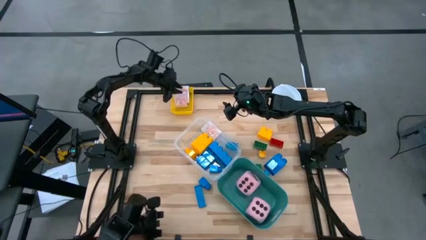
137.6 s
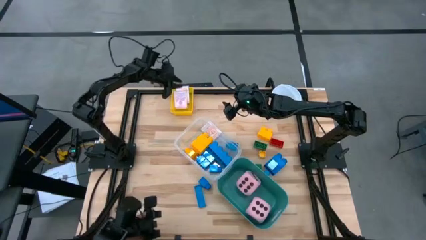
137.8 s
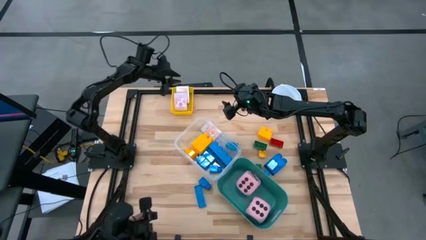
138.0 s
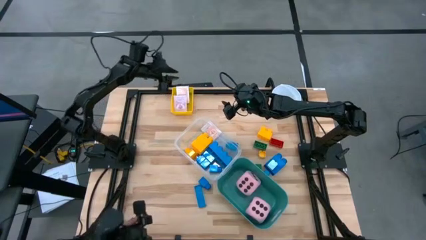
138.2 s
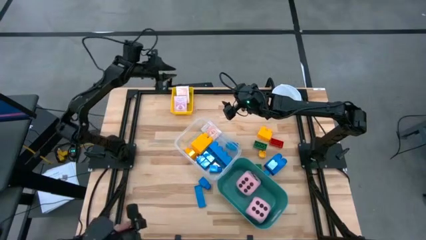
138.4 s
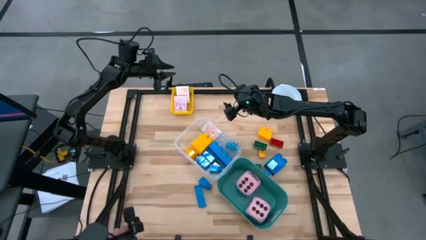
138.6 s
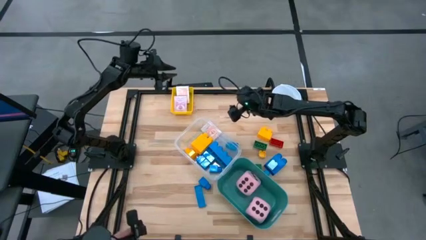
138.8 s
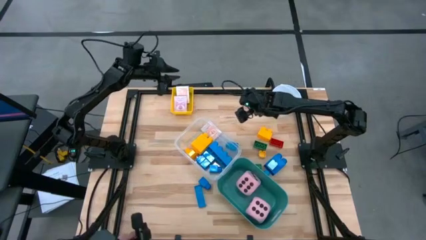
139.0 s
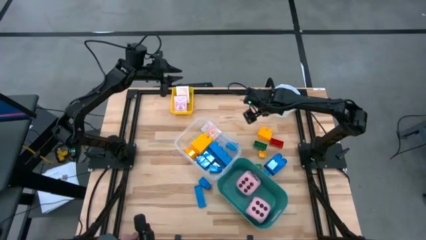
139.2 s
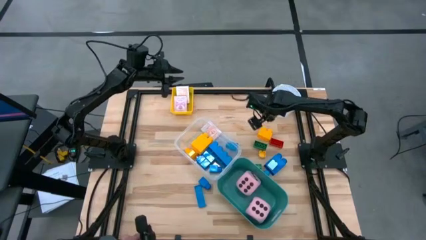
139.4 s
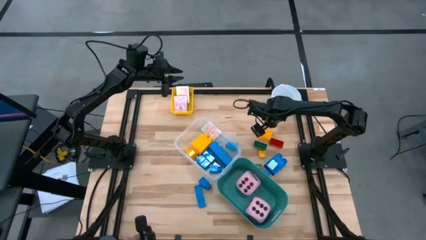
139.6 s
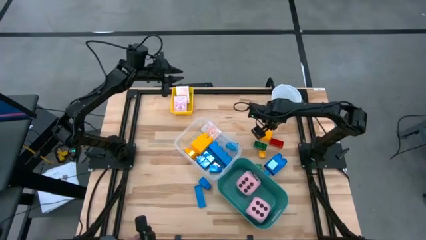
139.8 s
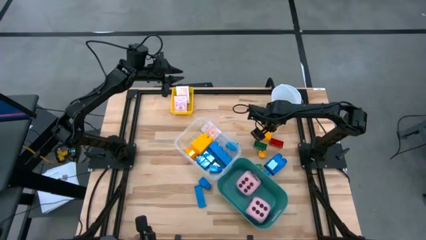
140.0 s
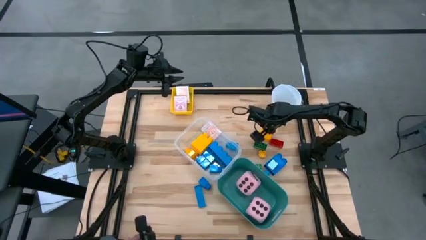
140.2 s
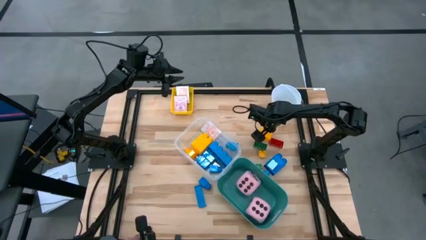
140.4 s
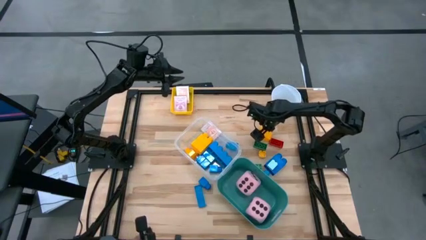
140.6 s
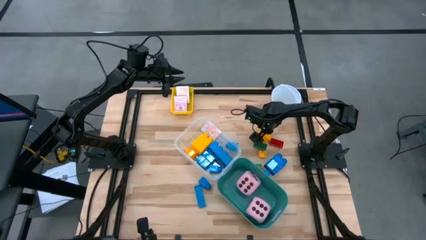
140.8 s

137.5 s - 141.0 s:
Task: Pick & Place Toys
Put the yellow game piece into the transparent bin

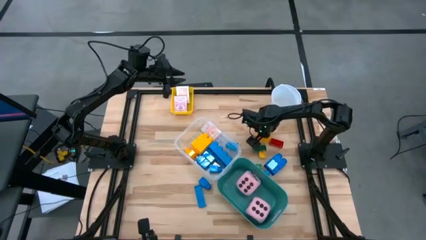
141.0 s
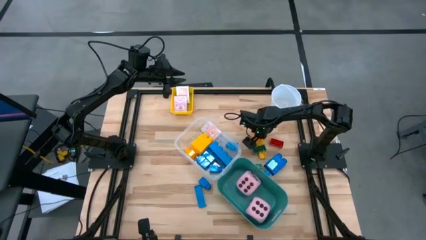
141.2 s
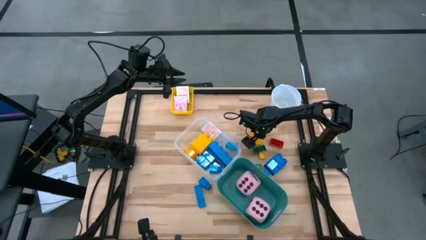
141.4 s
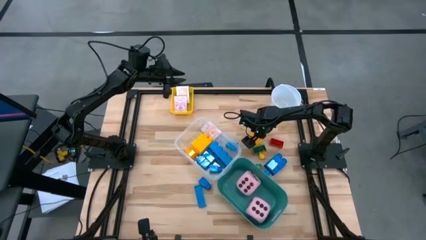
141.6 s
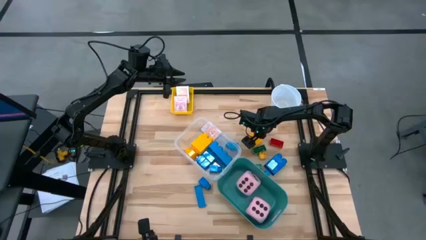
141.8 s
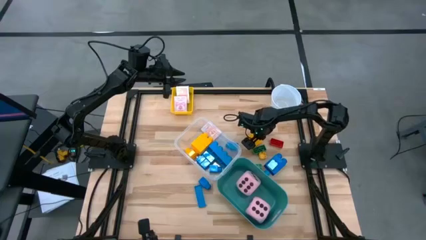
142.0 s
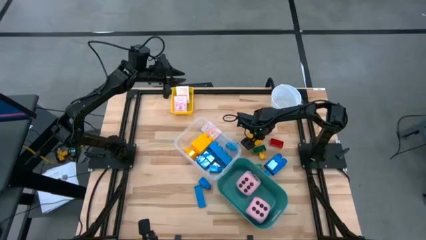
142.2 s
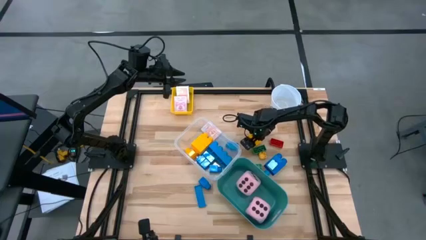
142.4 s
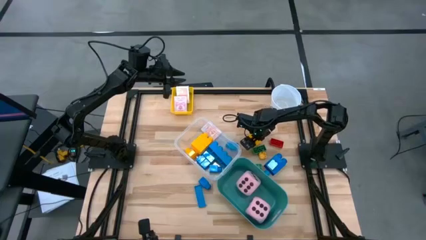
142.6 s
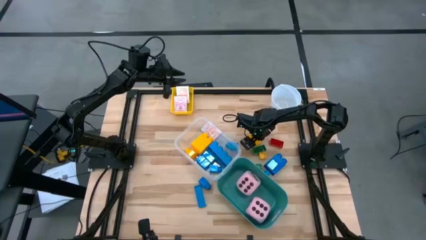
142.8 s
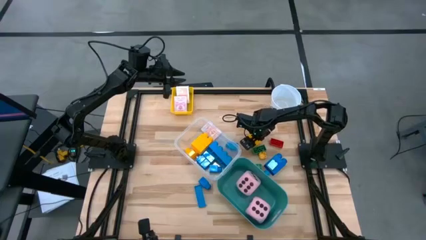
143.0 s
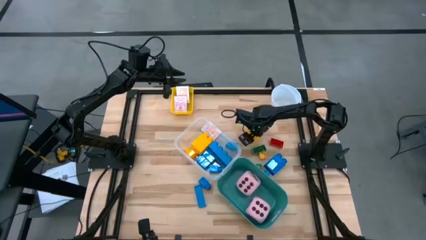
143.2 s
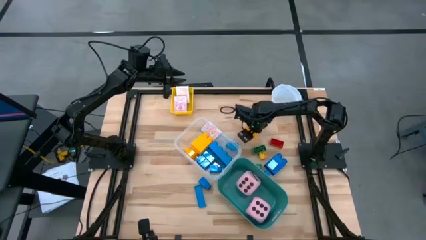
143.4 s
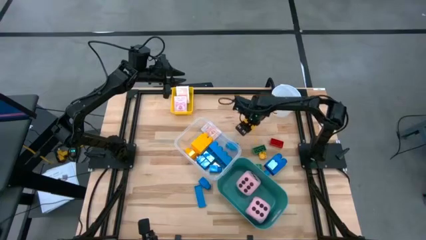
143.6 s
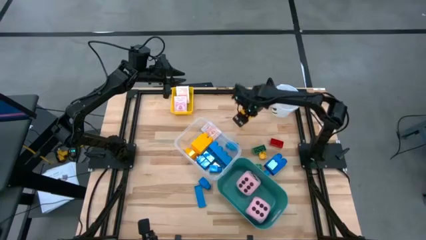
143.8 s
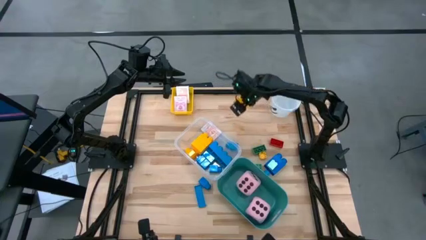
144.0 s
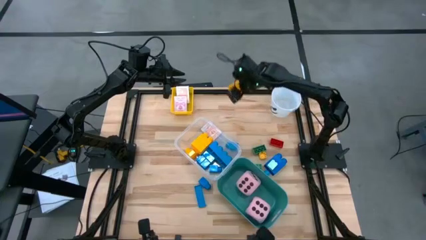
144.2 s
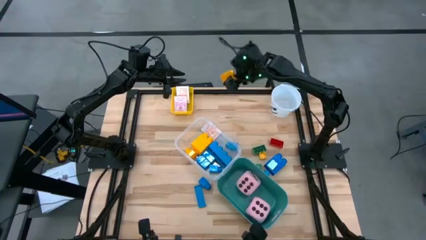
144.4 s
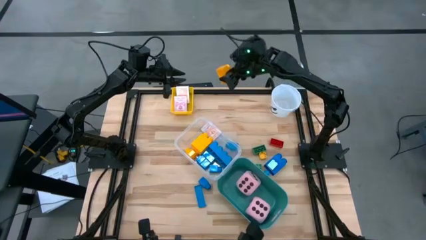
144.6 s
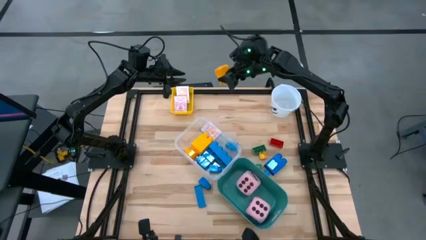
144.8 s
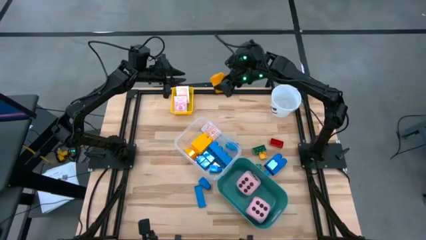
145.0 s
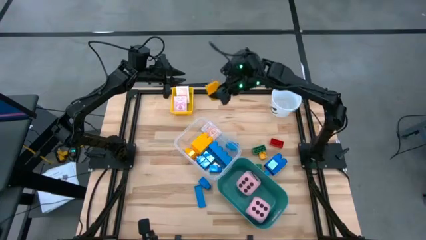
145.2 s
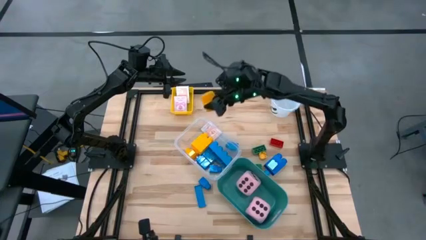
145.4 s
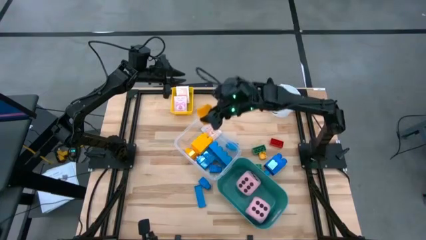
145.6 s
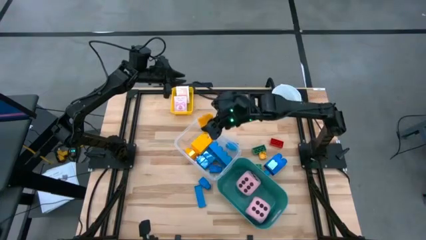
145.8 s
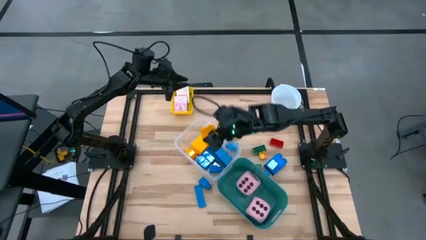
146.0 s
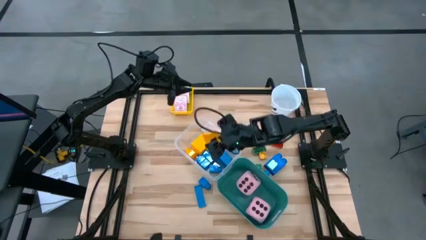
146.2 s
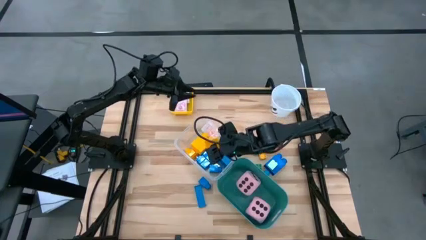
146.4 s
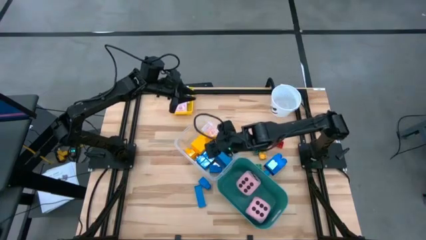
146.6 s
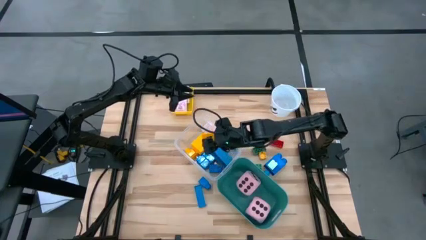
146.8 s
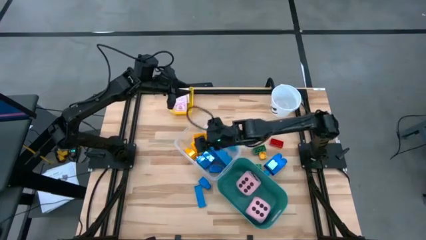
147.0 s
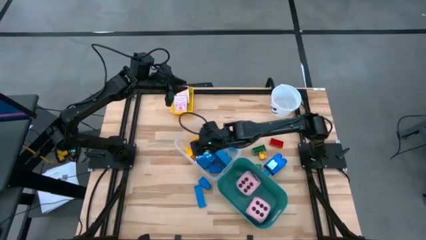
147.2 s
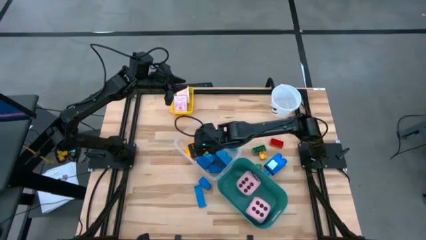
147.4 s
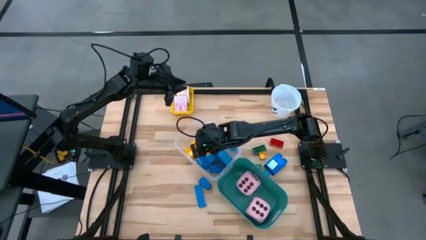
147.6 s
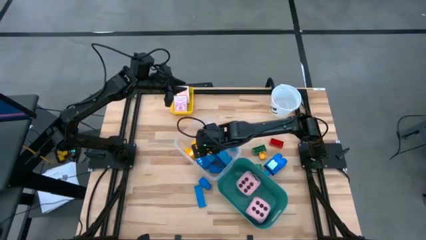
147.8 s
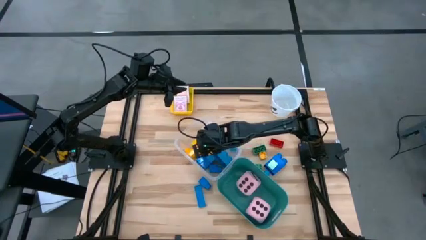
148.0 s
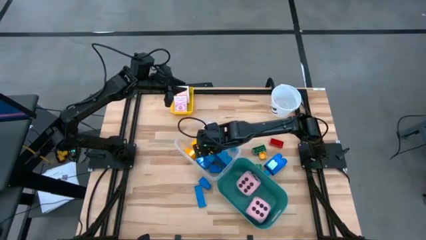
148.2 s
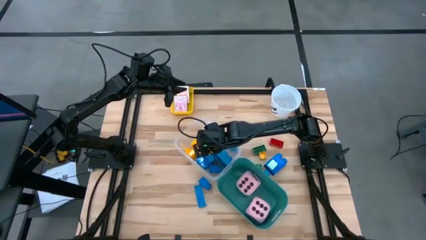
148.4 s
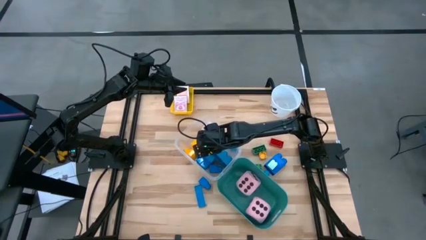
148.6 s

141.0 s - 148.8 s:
Put the yellow game piece into the transparent bin
